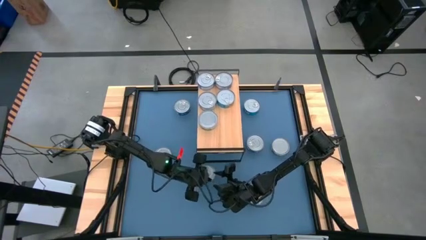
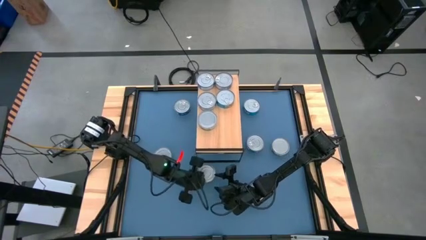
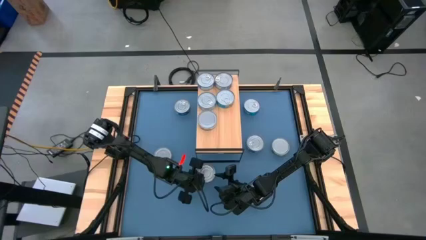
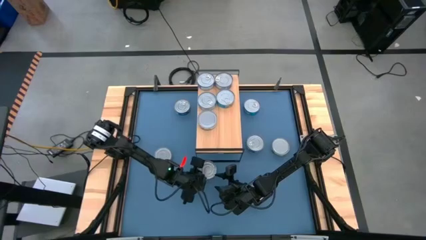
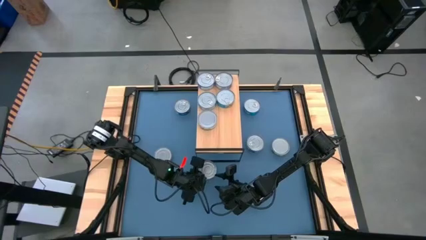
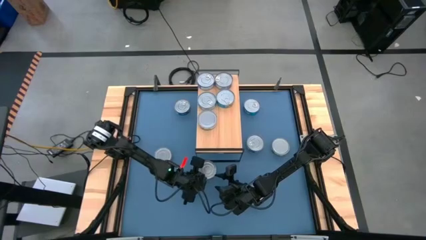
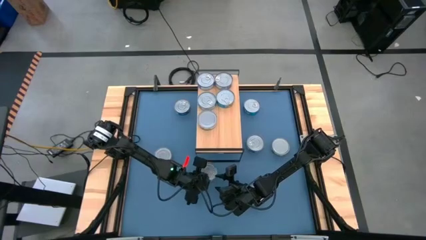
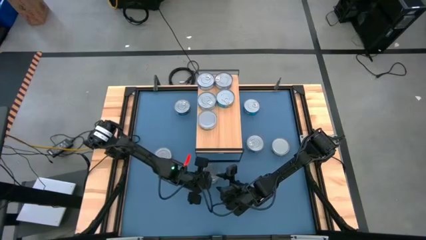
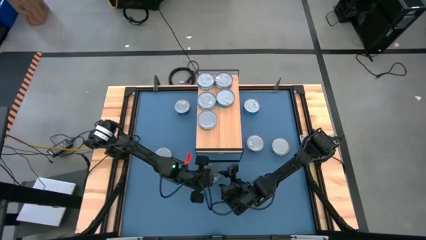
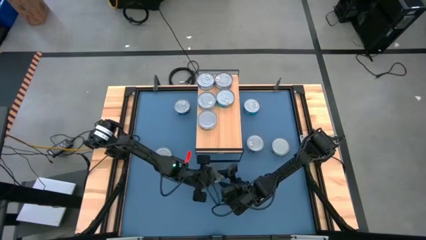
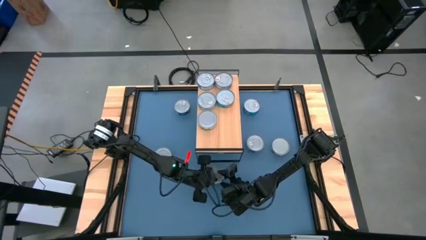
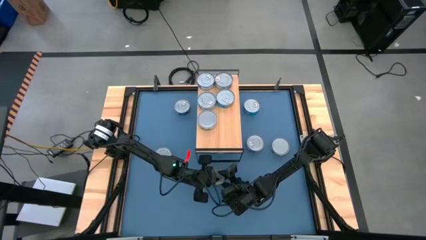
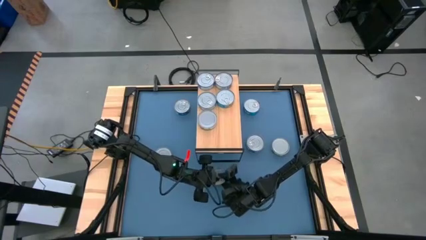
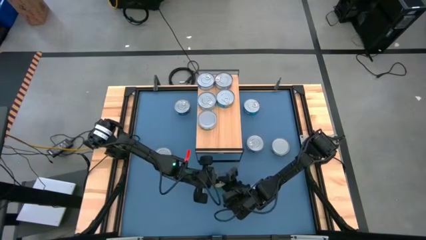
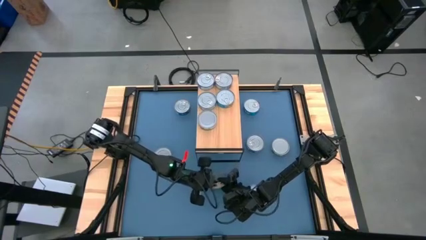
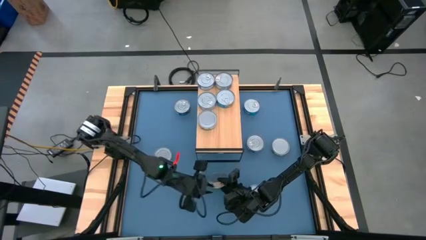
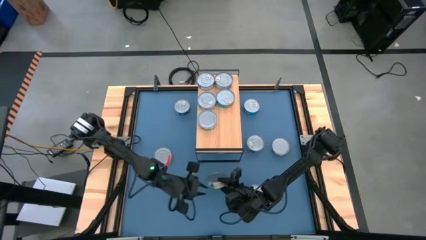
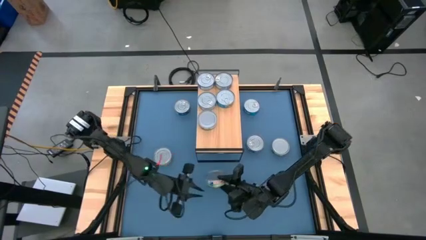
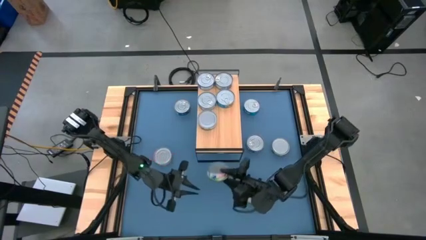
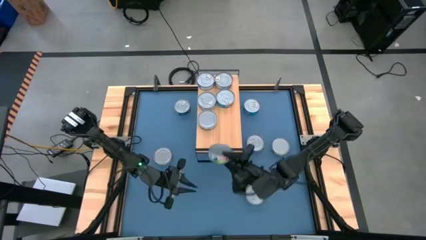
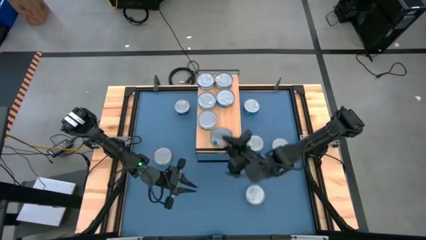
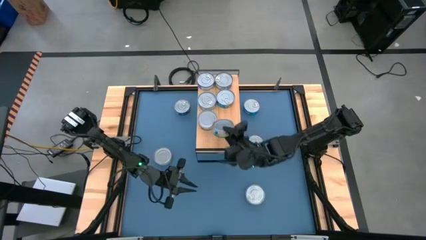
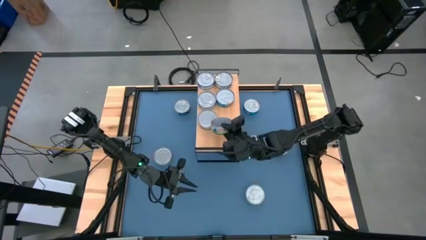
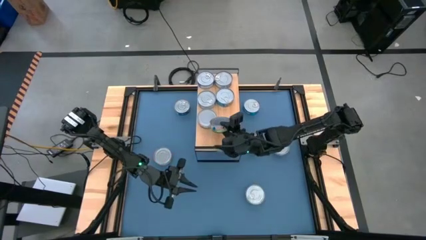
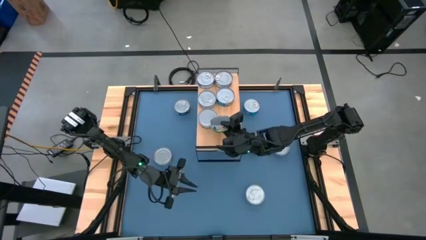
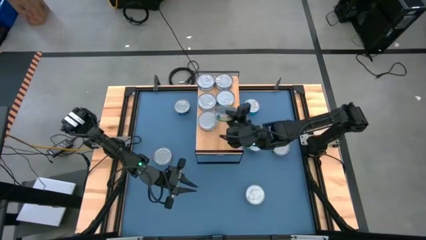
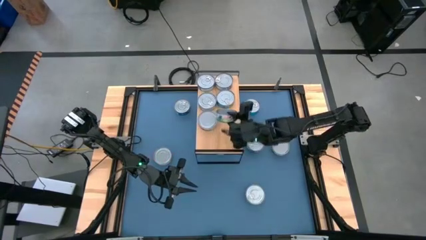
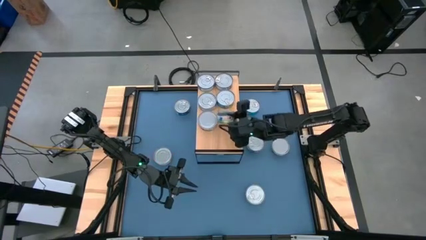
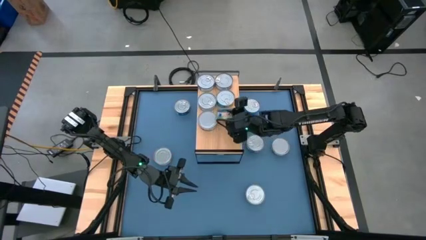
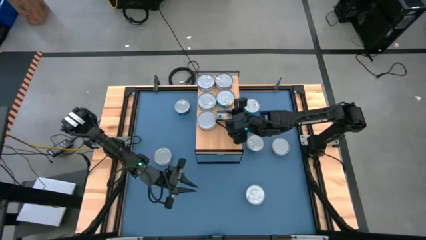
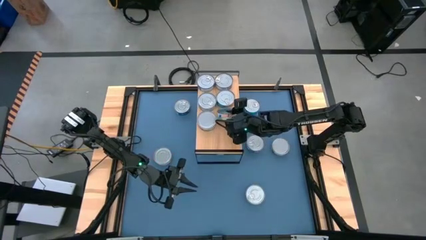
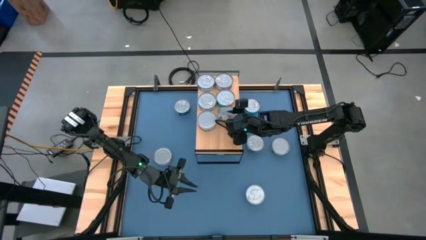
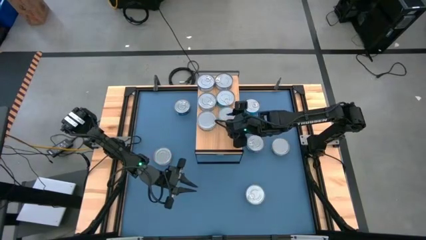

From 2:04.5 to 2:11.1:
Task: Stack canned seafood by type on shelf
Put the green tuna on the shelf

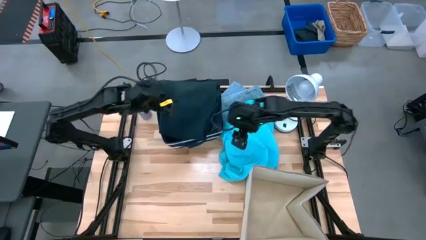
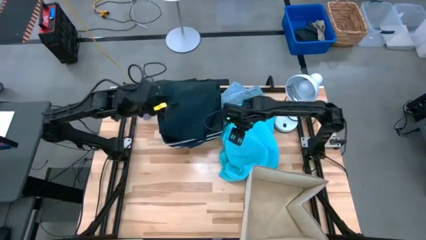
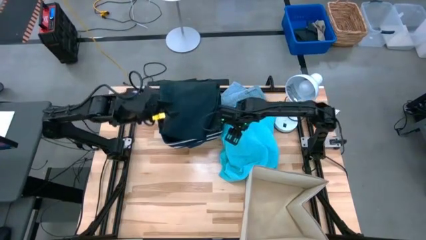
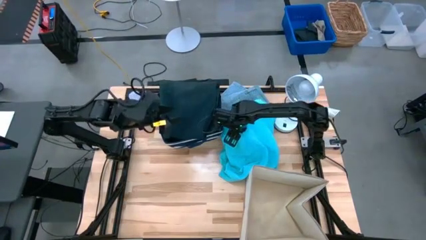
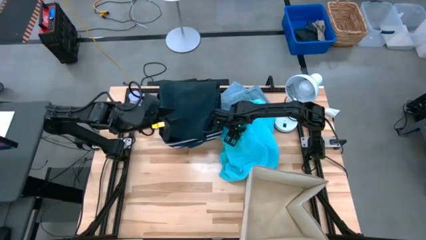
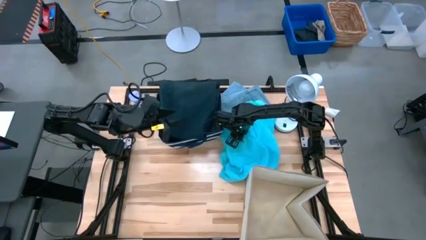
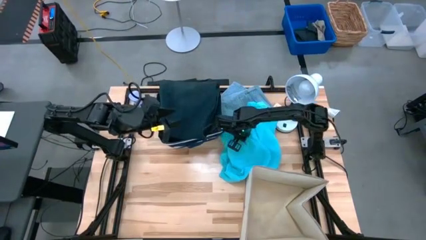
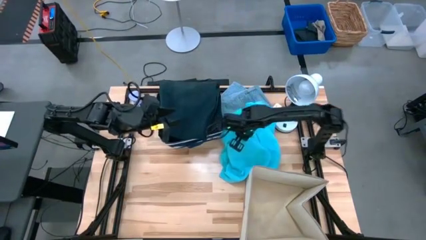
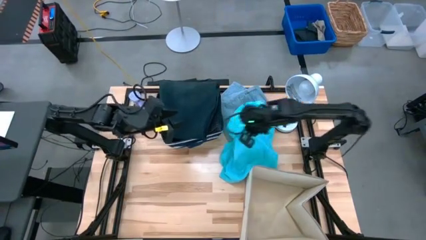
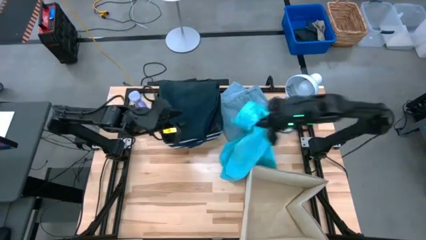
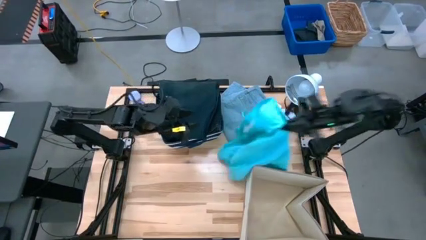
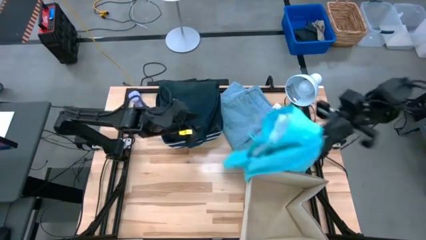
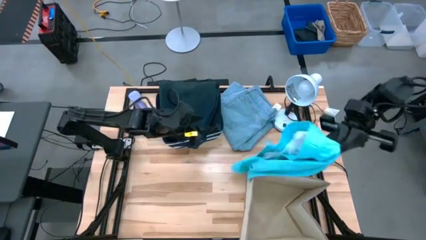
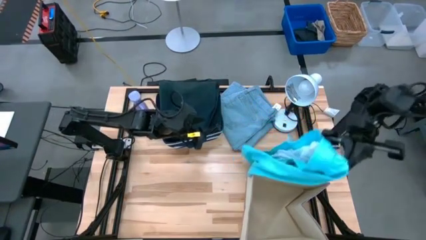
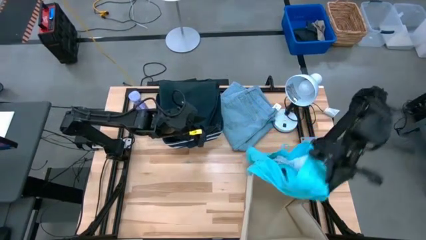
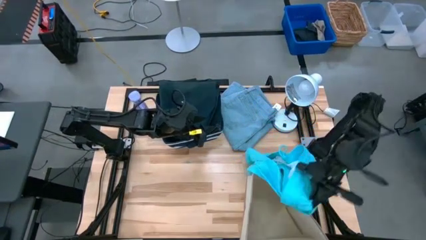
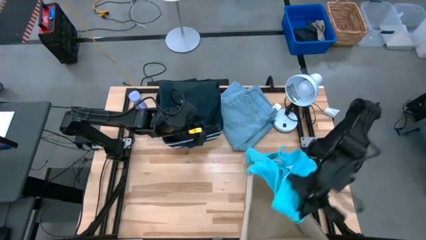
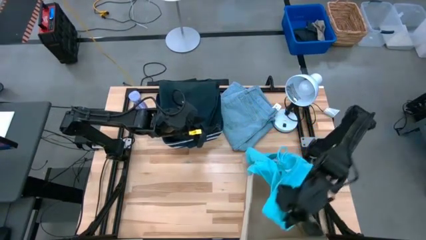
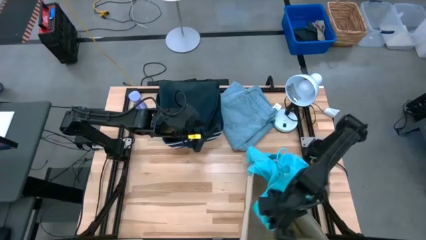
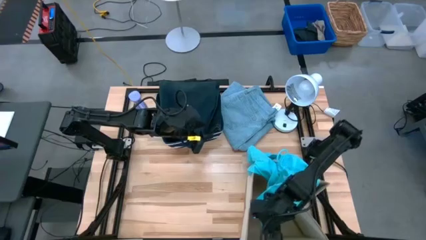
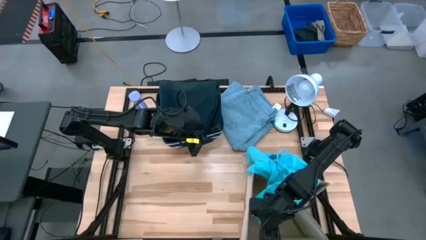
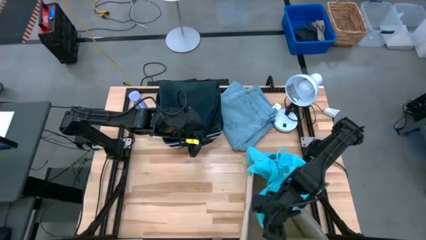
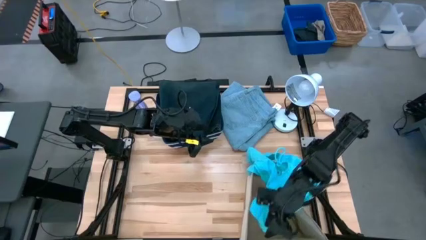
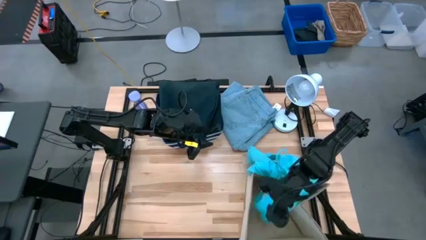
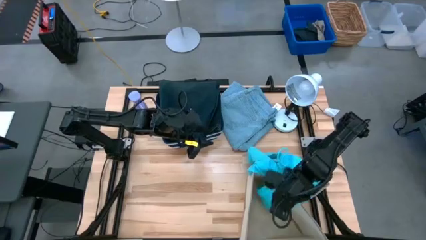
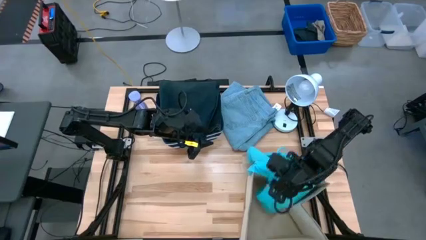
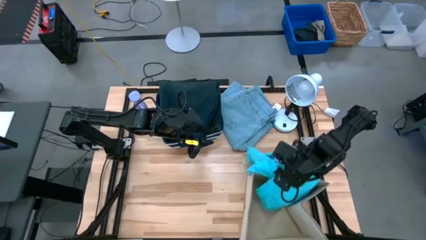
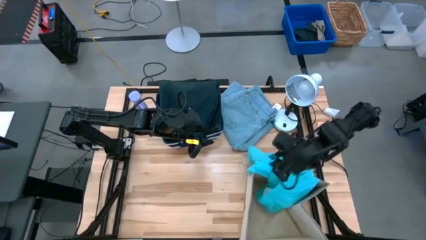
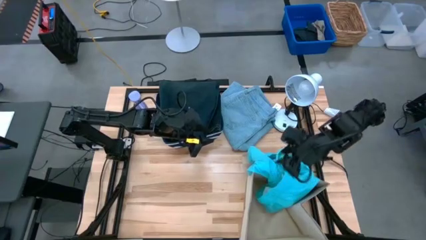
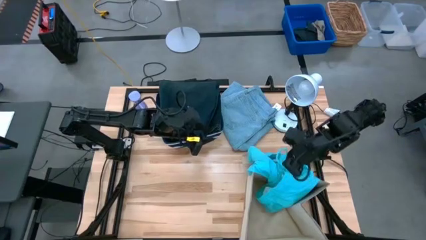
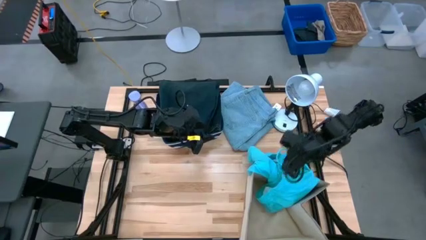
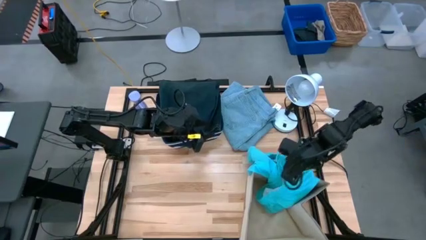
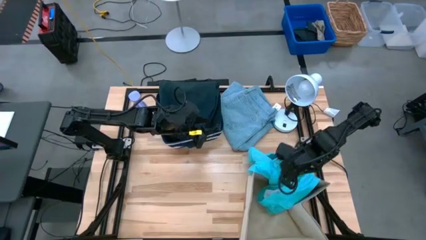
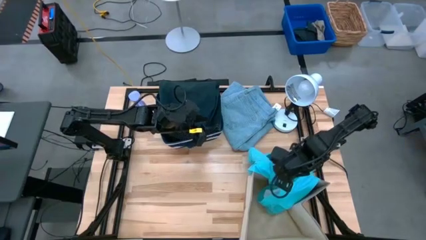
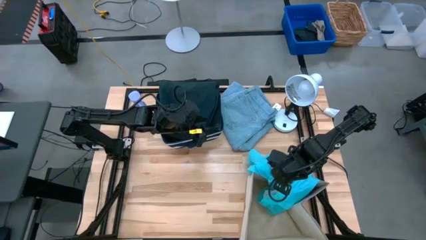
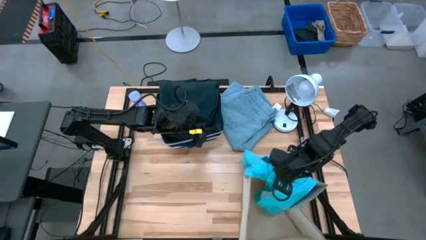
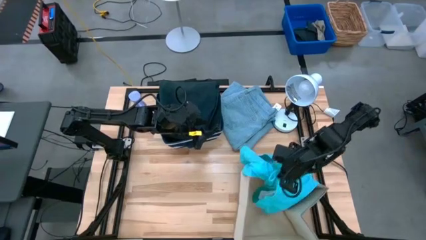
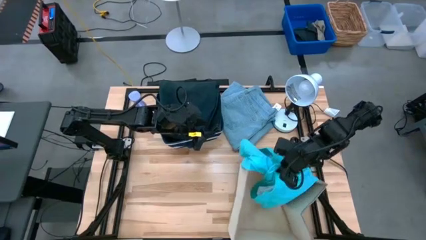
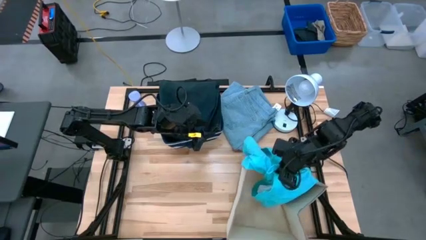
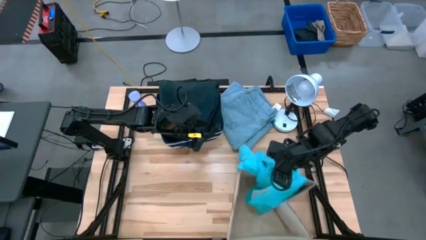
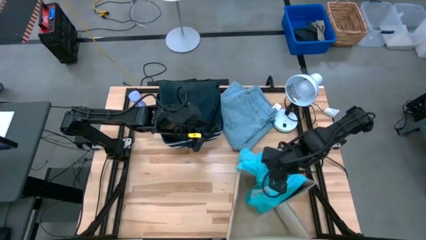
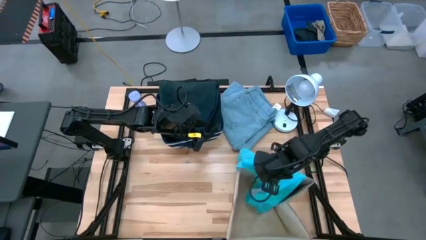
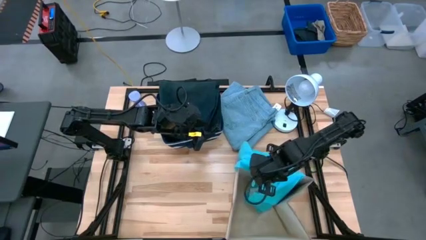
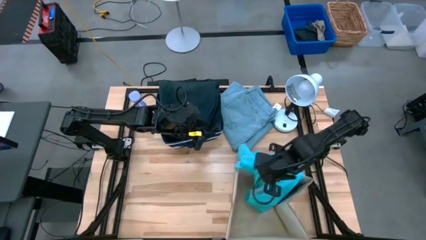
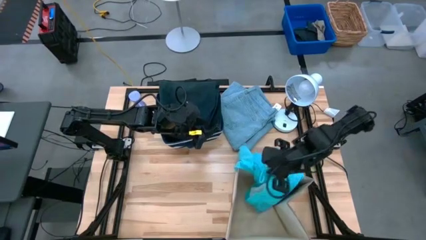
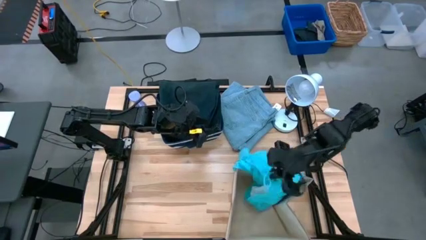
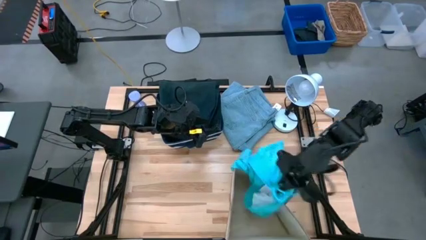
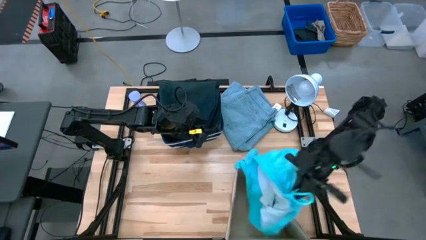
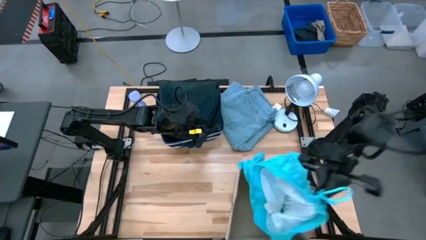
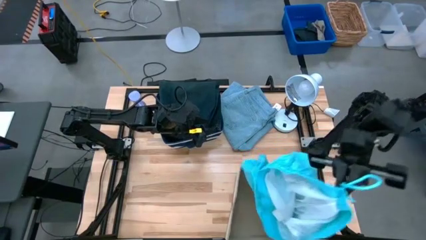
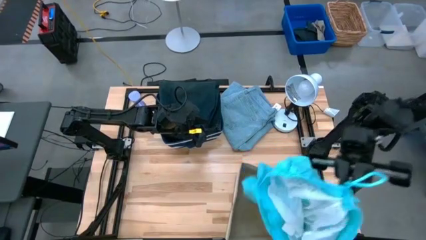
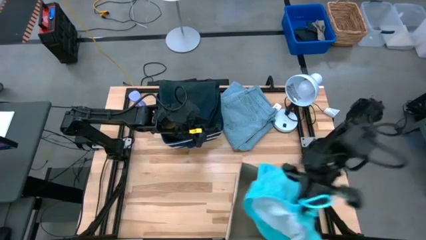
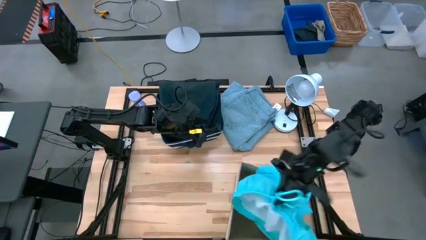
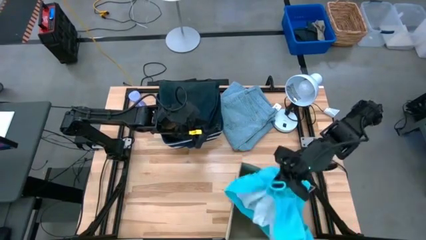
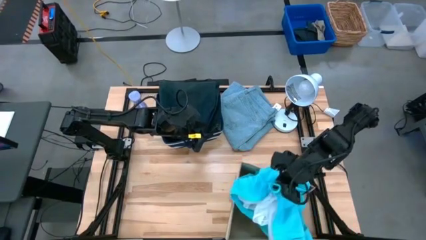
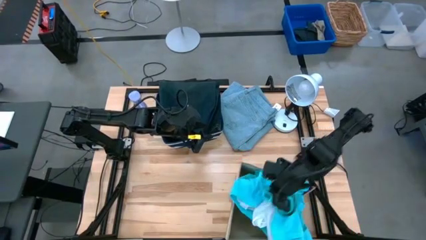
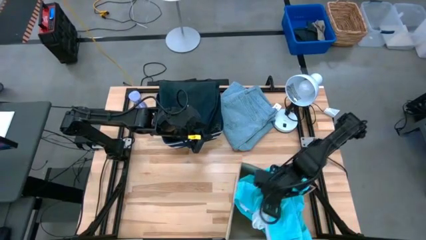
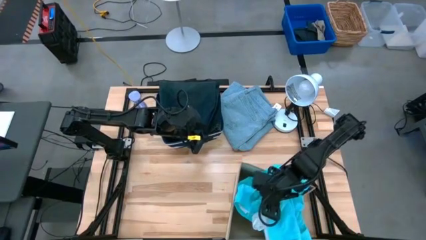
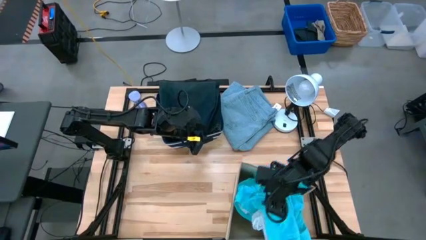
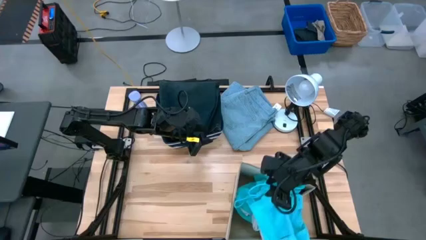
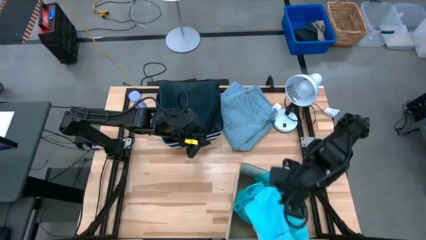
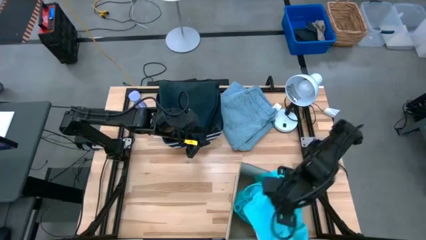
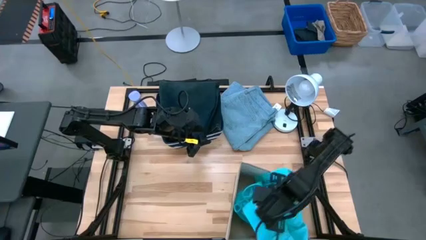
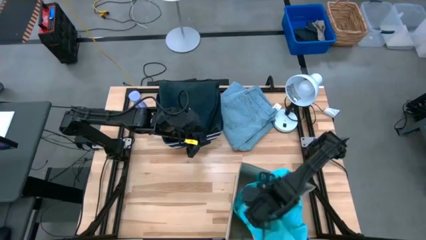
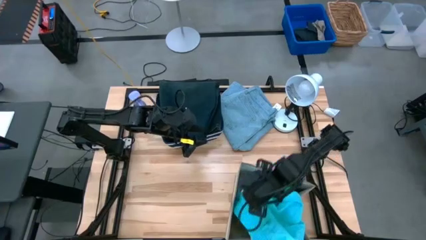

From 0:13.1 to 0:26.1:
Task: Sort clothes
Put the blue shorts into the white laundry organizer
